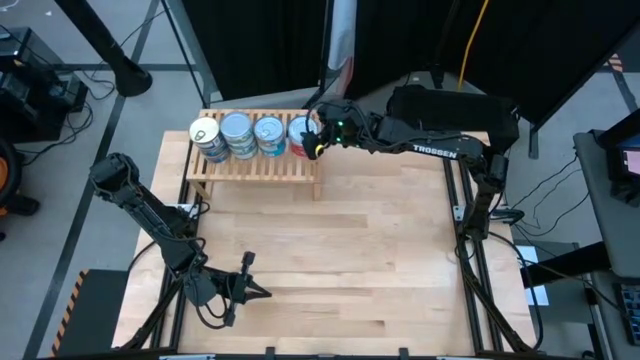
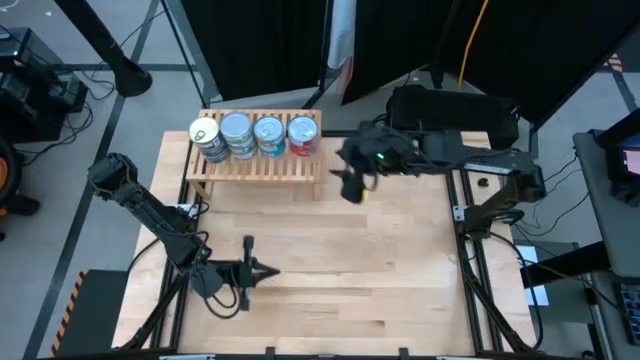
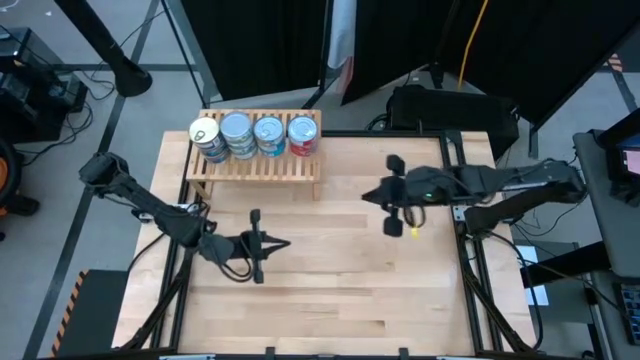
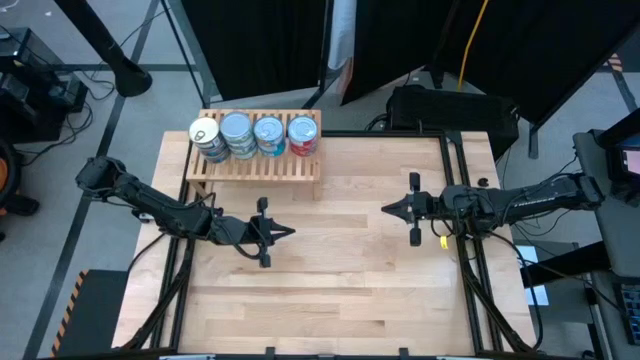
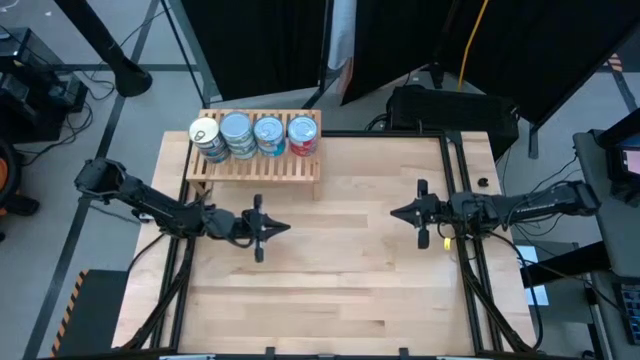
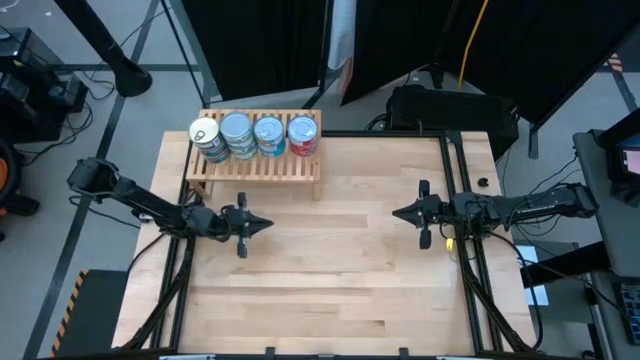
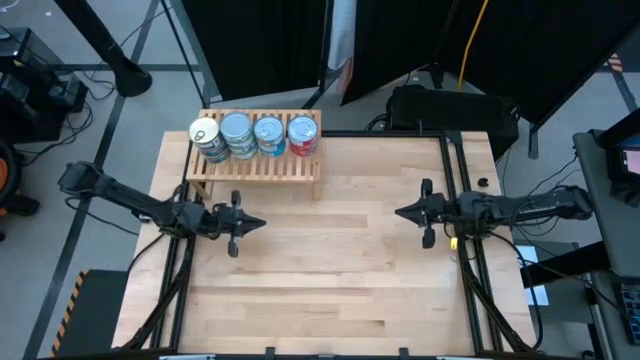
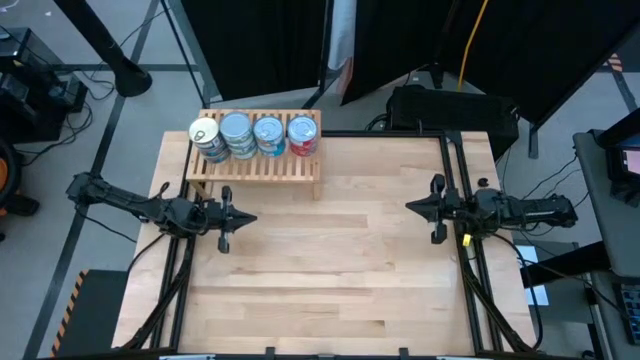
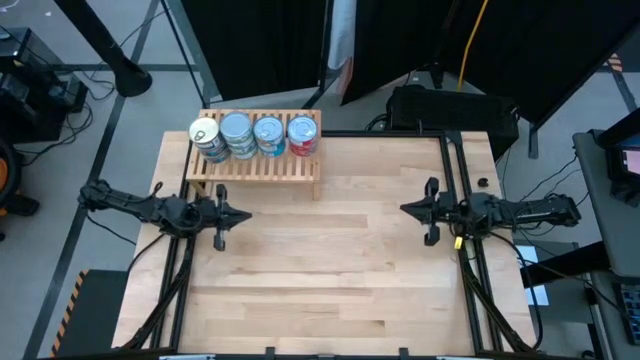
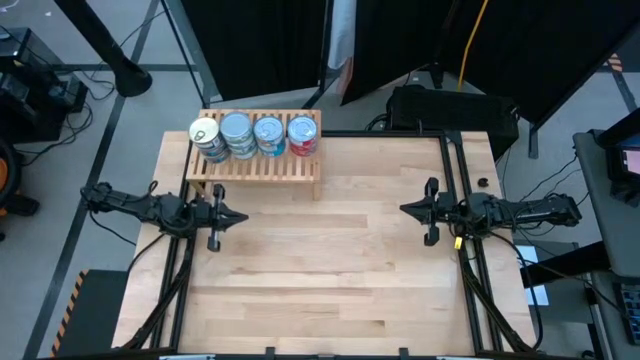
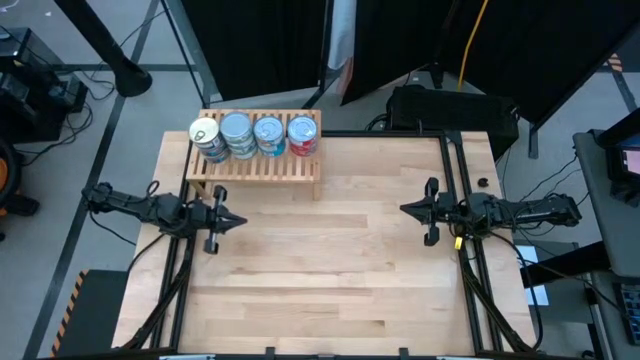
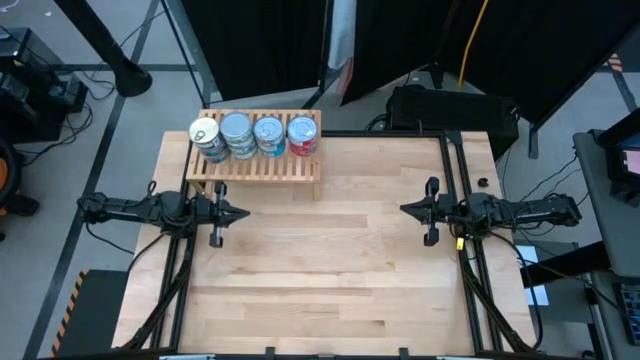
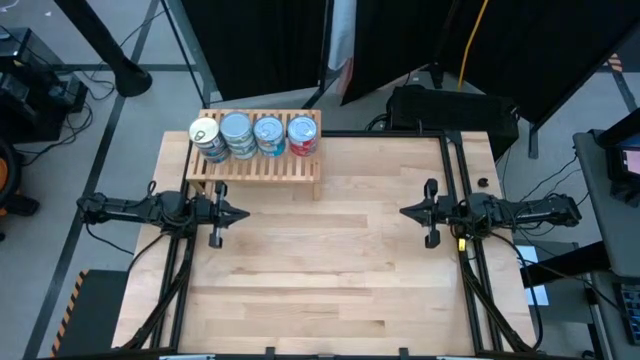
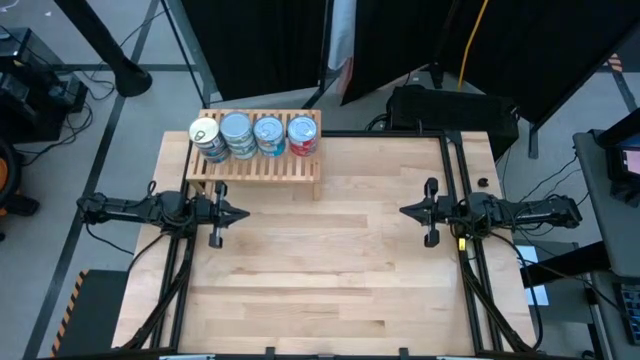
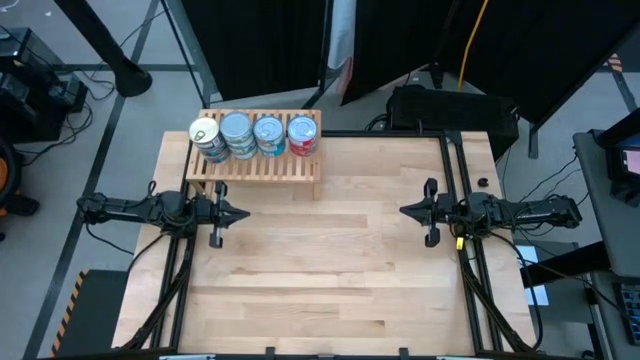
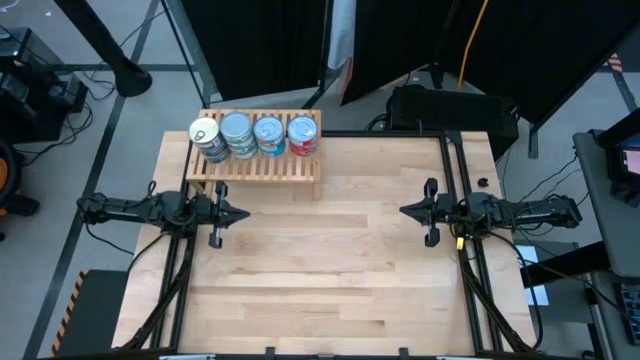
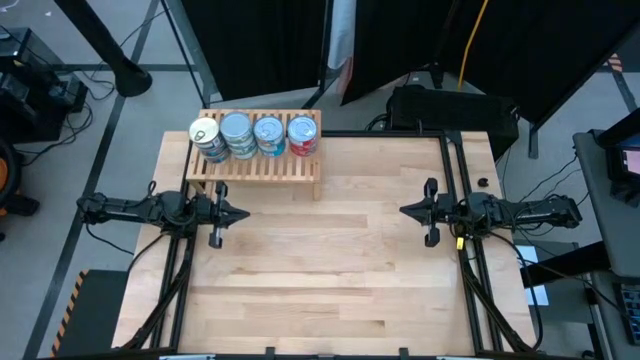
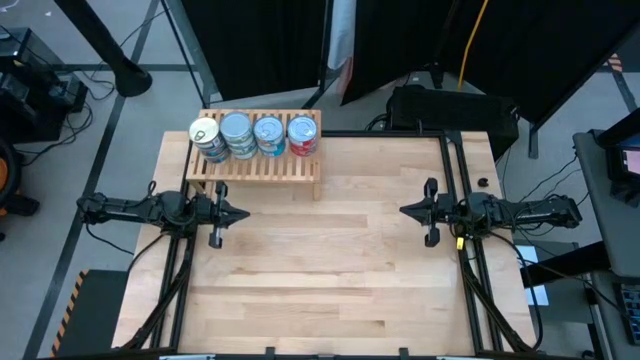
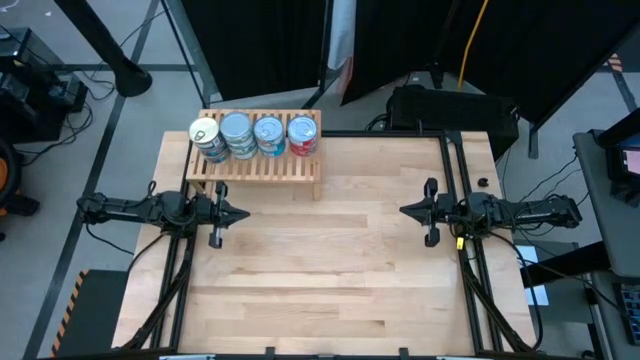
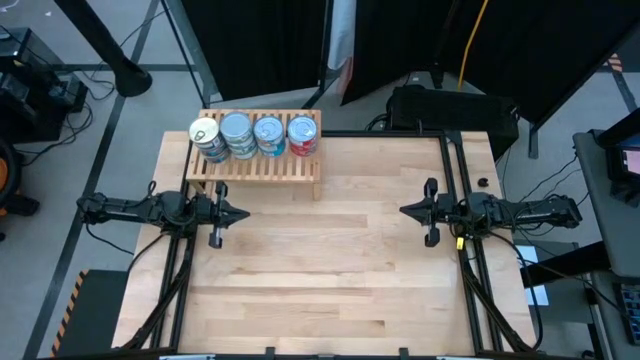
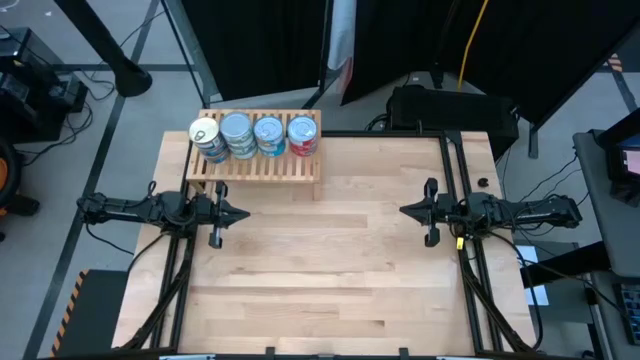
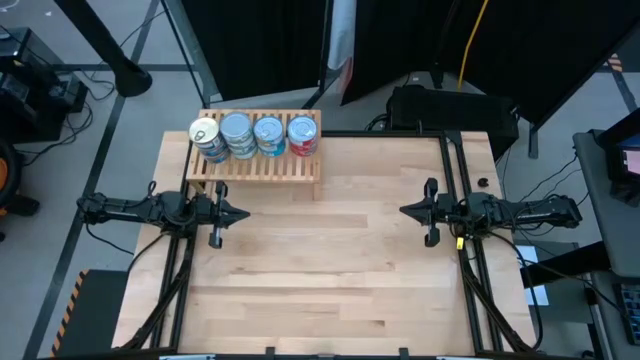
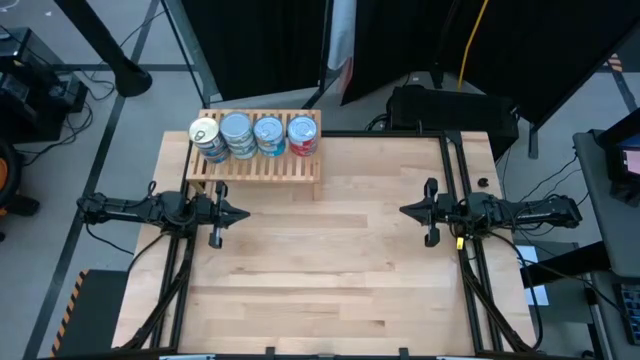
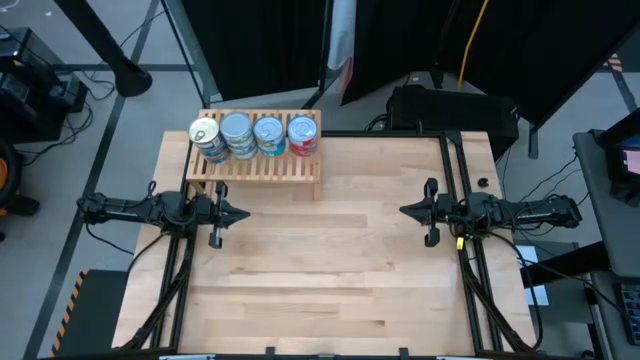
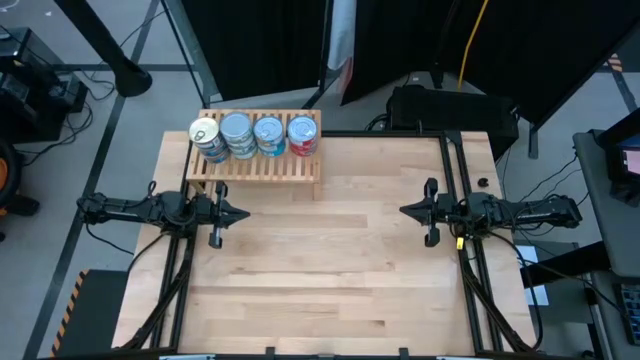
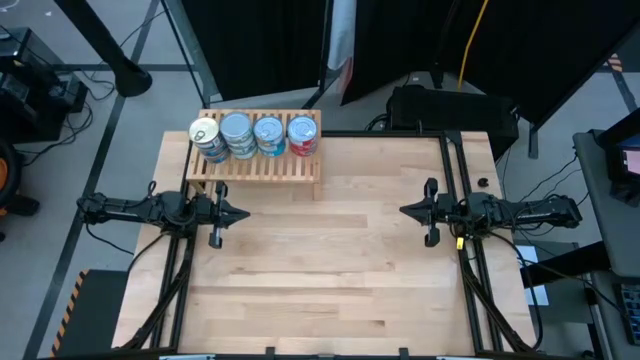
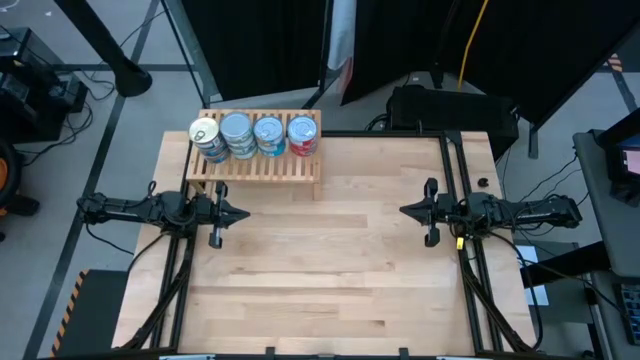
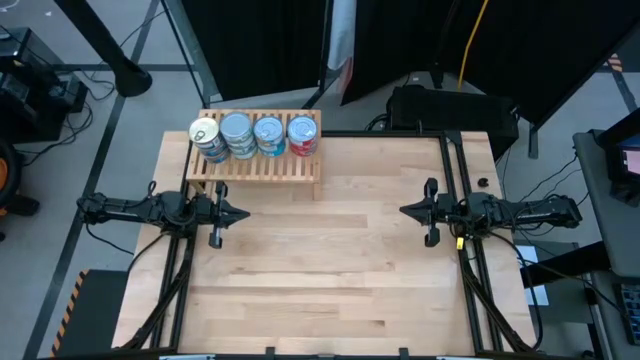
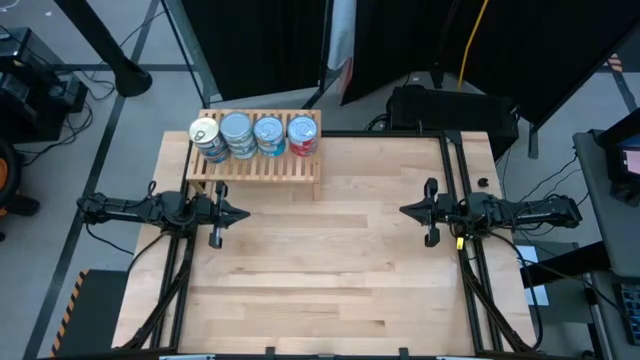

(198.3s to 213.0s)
Task: Stack canned seafood by type on shelf
Return to Home Position

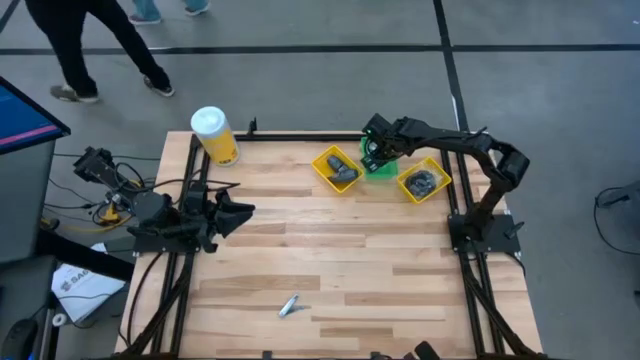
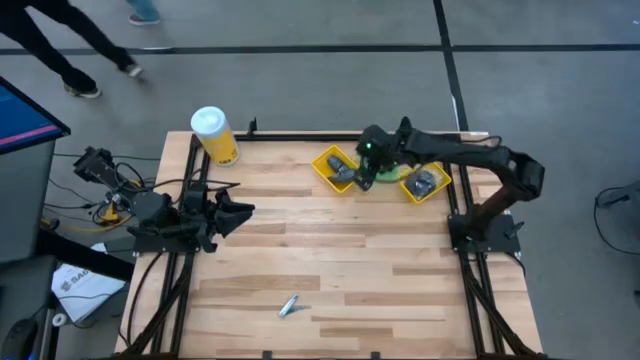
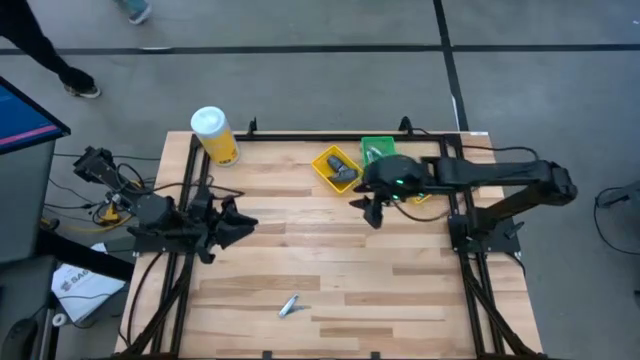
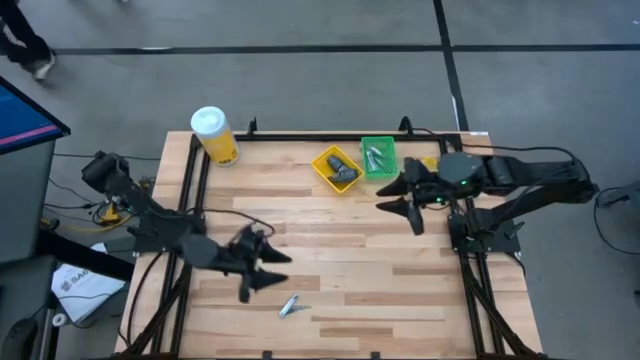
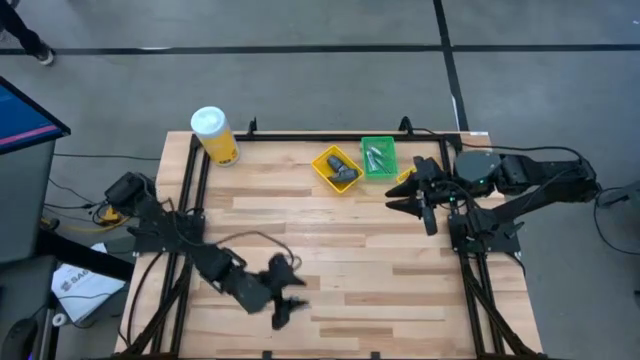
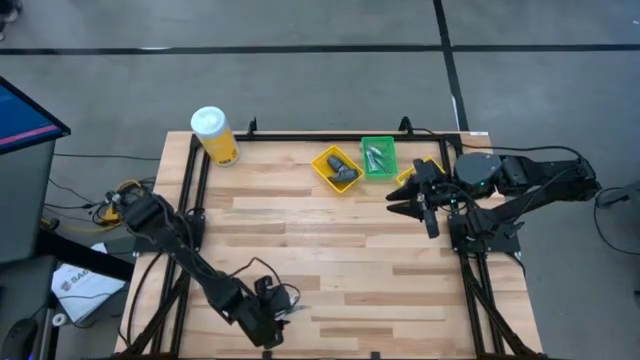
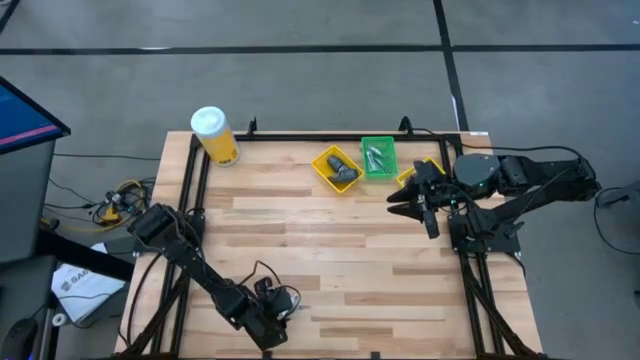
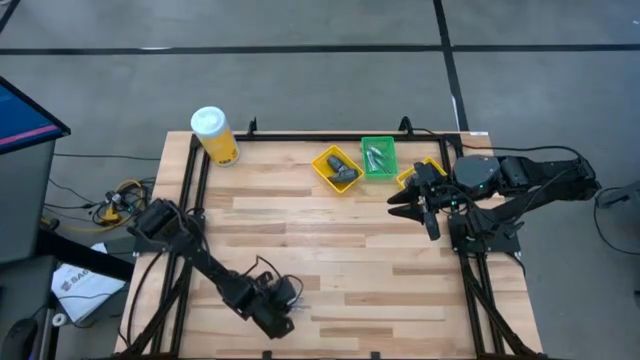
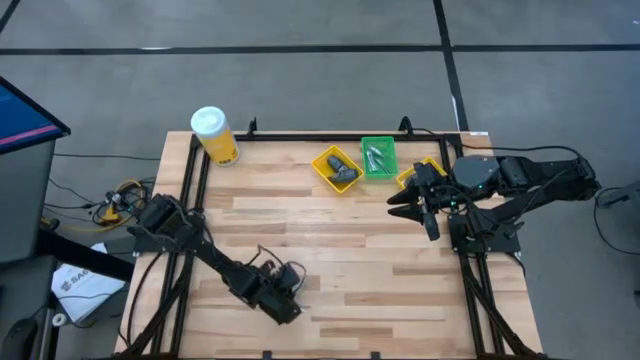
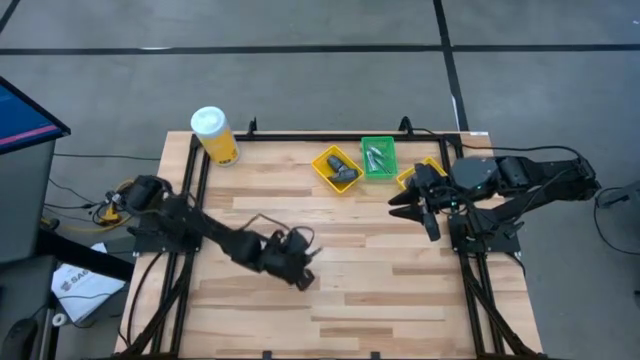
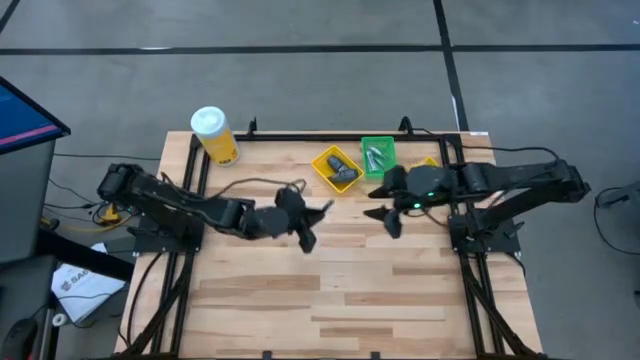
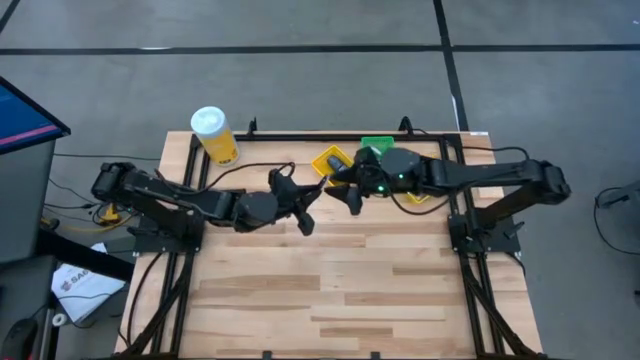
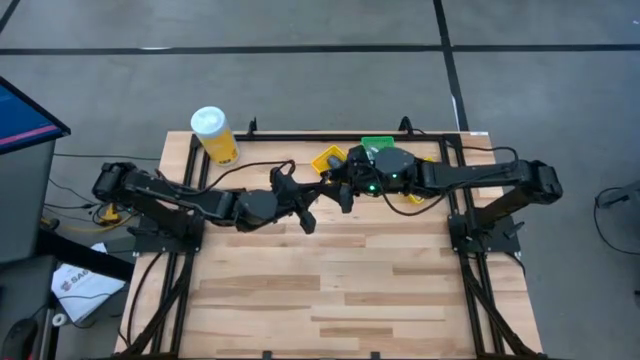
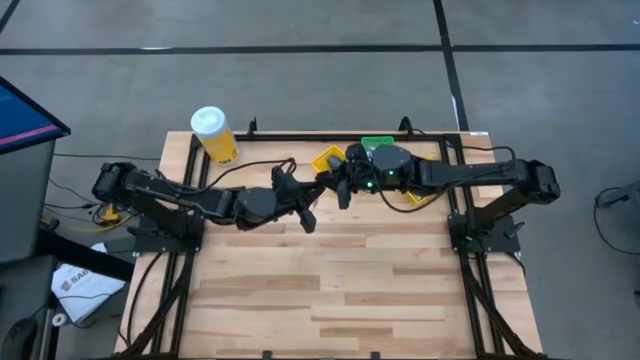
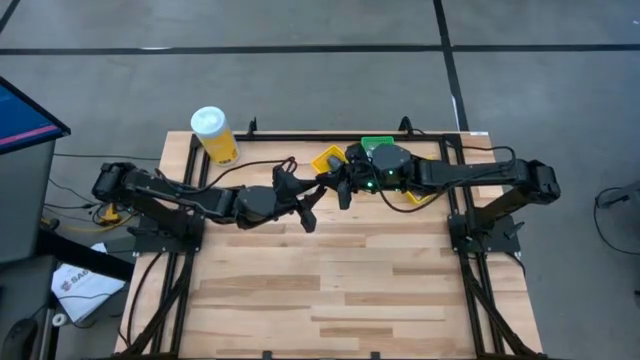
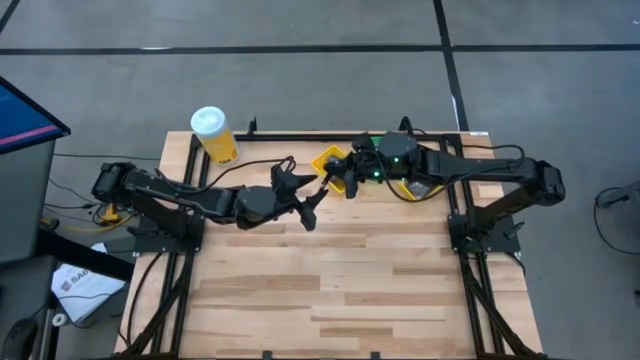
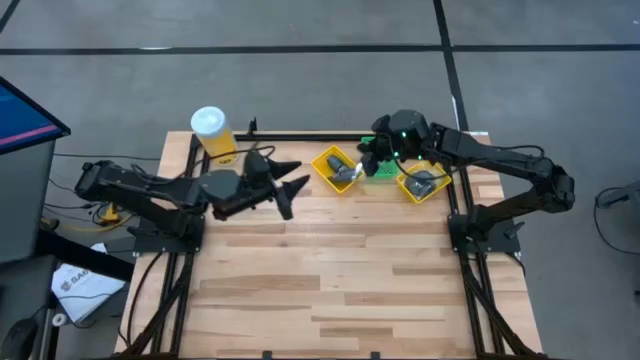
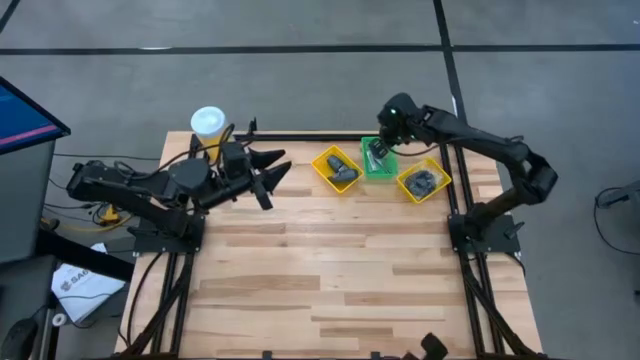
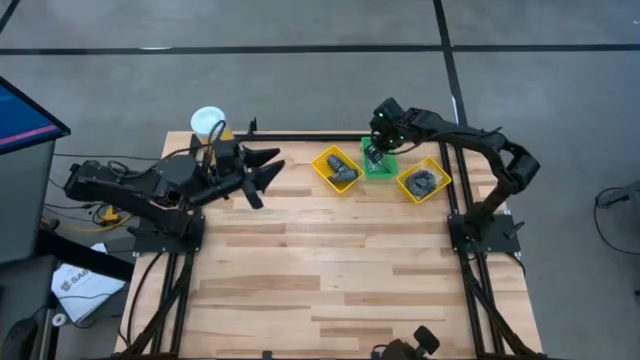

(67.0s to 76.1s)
Task: Pick & Place Travel size toiletries
Put the silver nail cutter into the green basket
